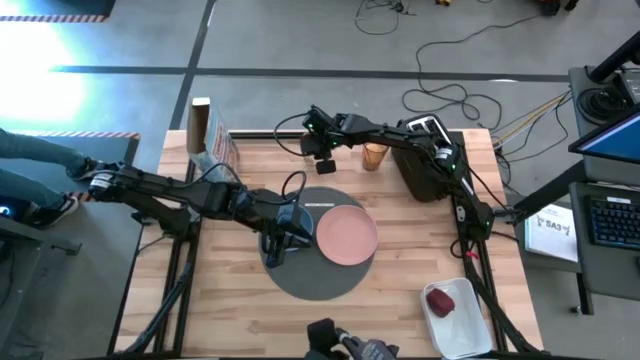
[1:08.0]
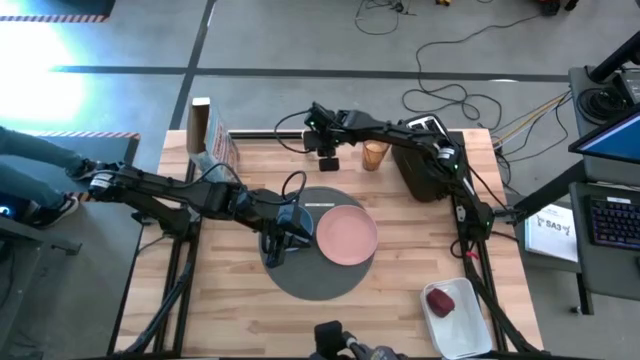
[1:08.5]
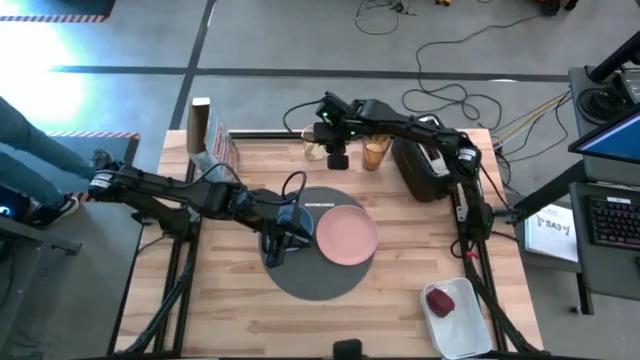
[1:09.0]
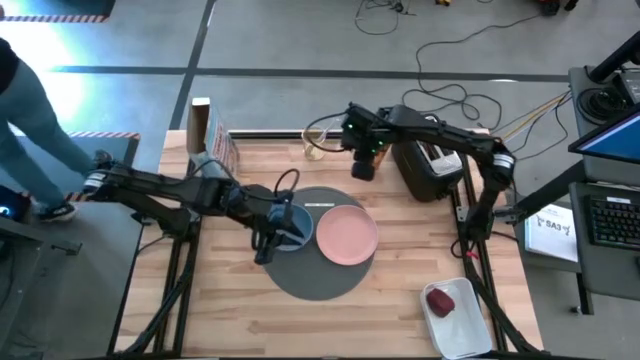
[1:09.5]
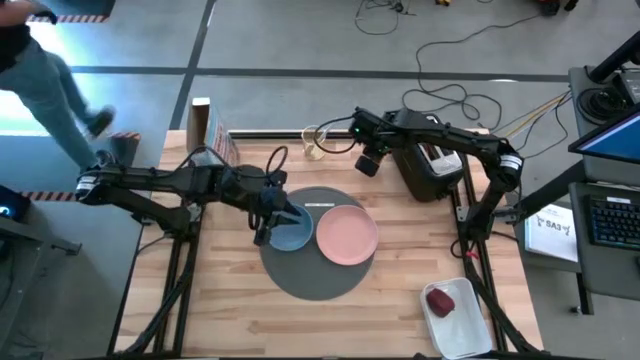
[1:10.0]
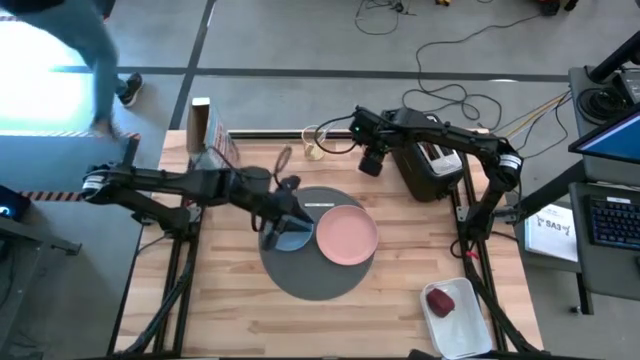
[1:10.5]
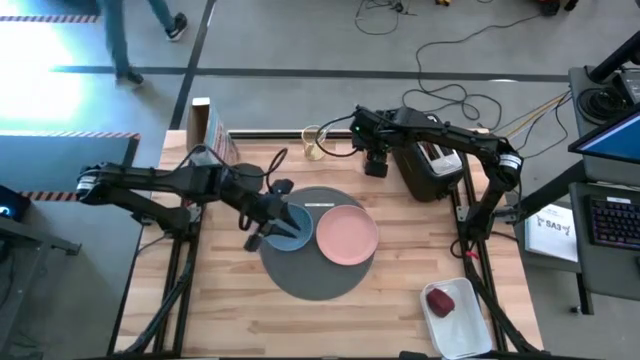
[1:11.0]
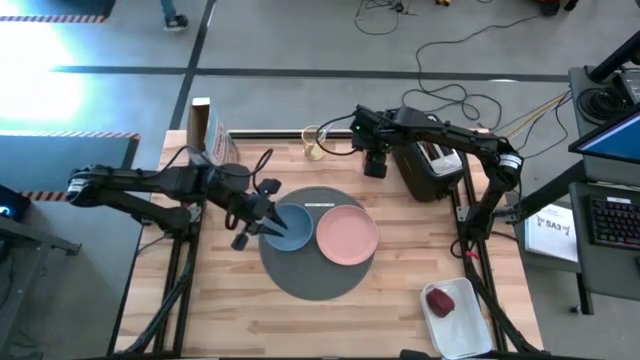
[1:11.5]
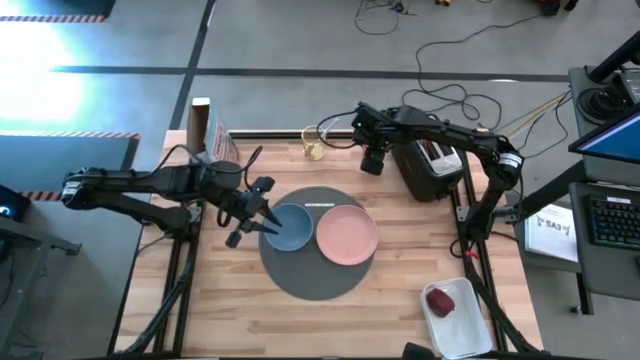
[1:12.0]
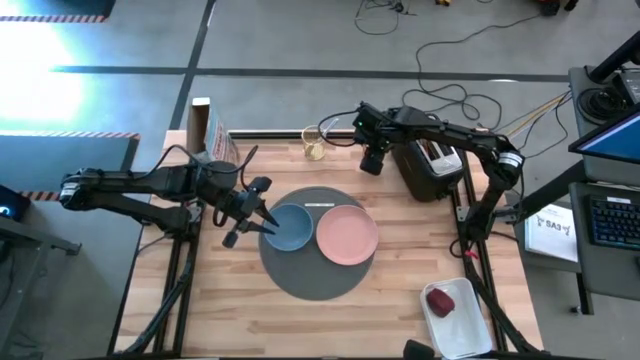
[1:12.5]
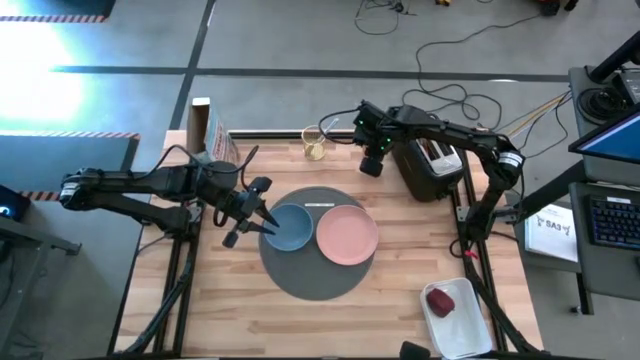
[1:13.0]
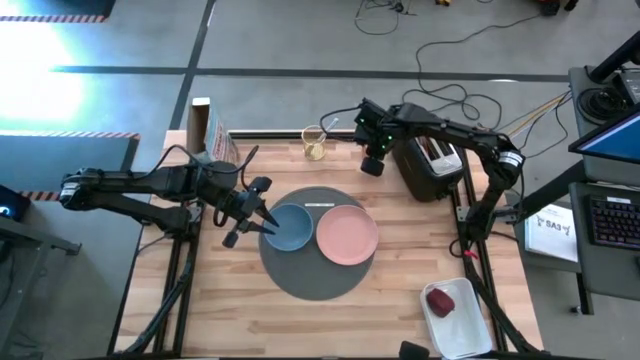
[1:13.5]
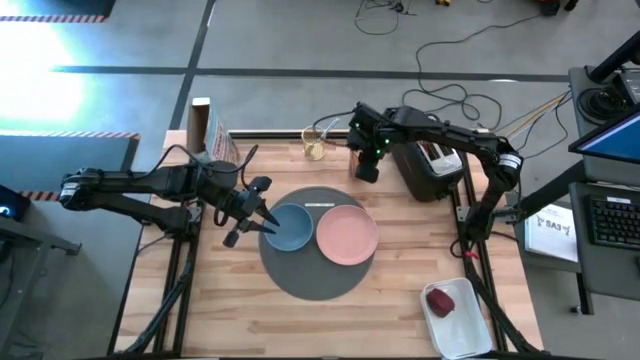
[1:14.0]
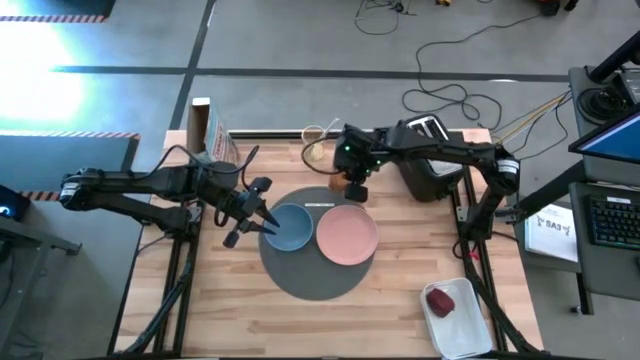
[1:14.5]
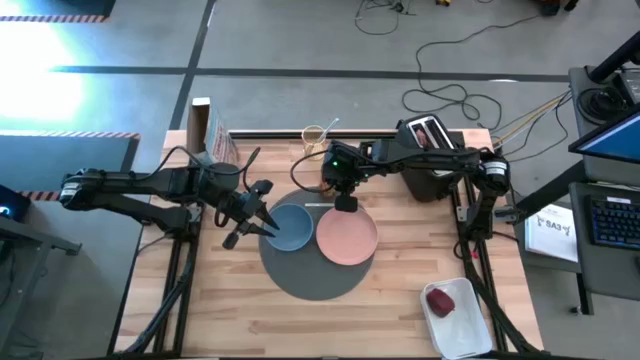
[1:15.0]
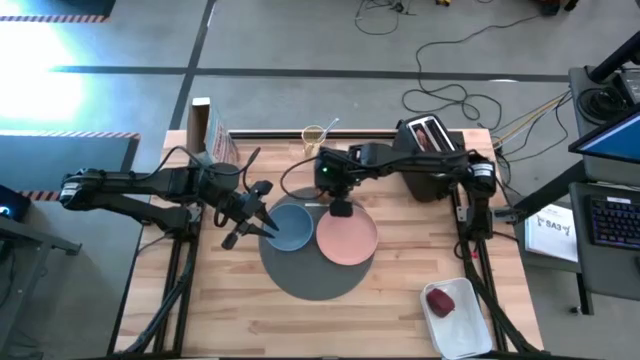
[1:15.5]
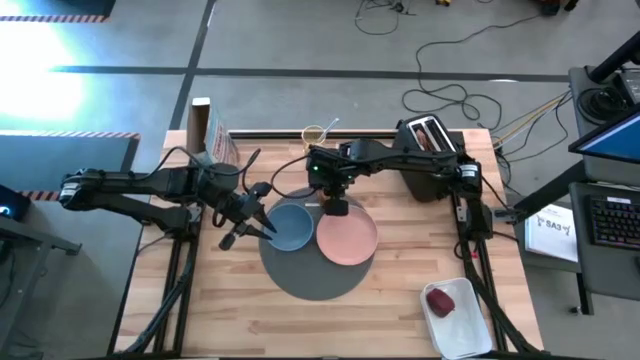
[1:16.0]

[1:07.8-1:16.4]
Task: Arrange a breakfast setting
Put the brown glass with rice on the gray table placemat

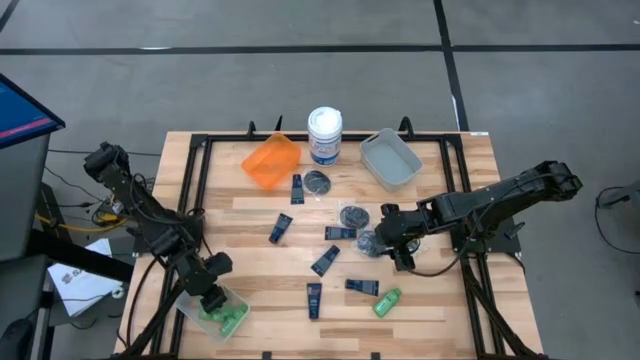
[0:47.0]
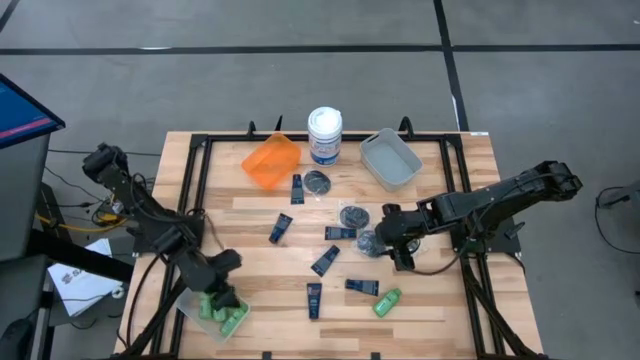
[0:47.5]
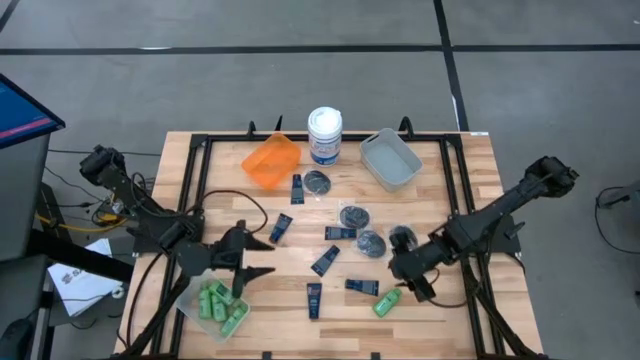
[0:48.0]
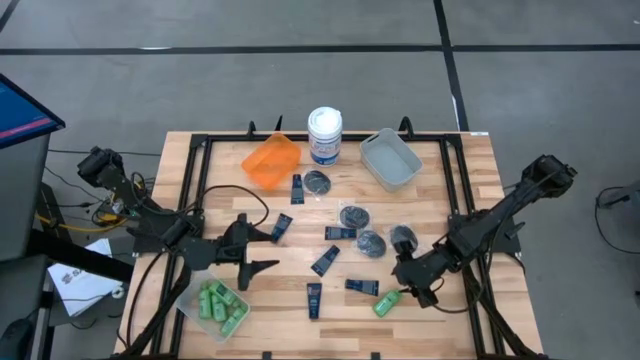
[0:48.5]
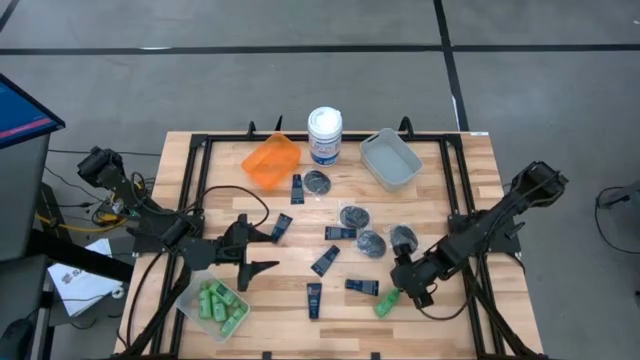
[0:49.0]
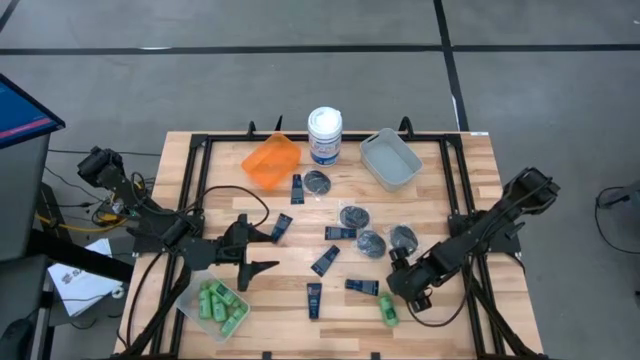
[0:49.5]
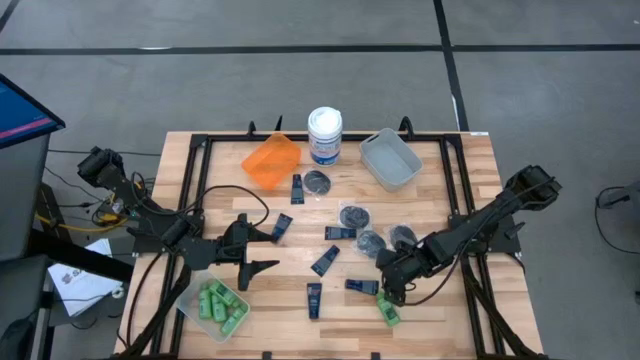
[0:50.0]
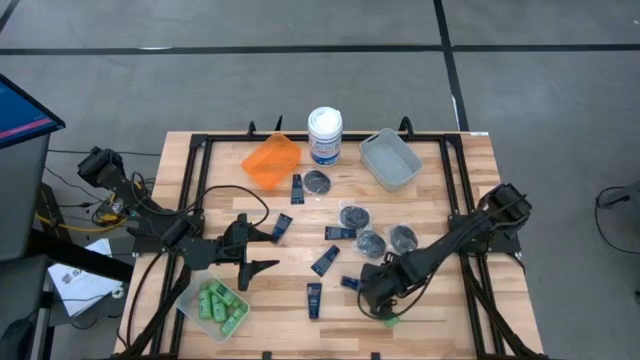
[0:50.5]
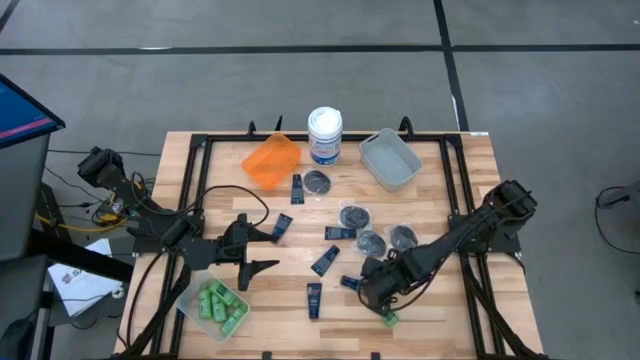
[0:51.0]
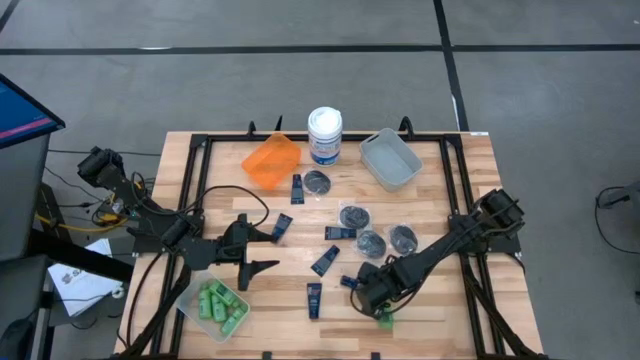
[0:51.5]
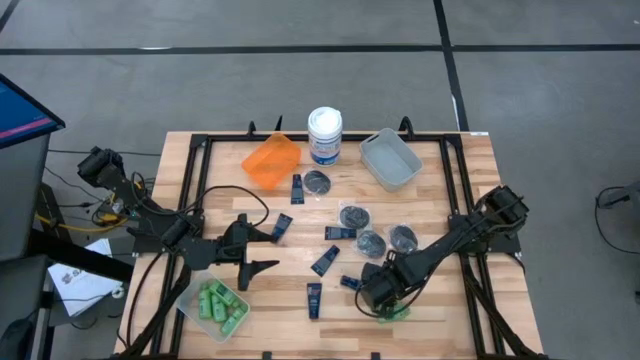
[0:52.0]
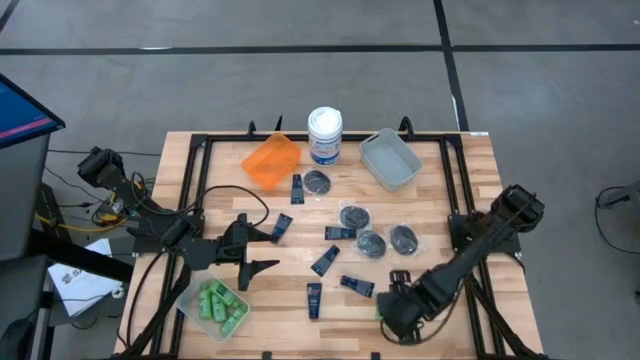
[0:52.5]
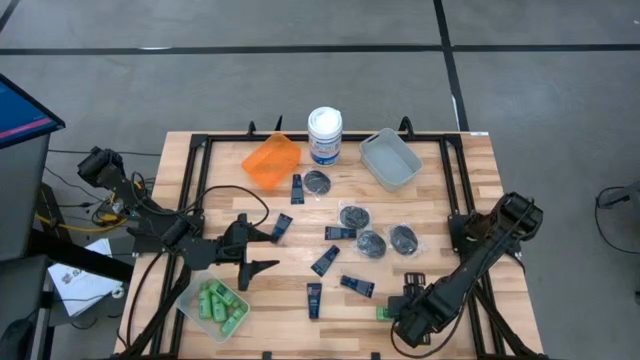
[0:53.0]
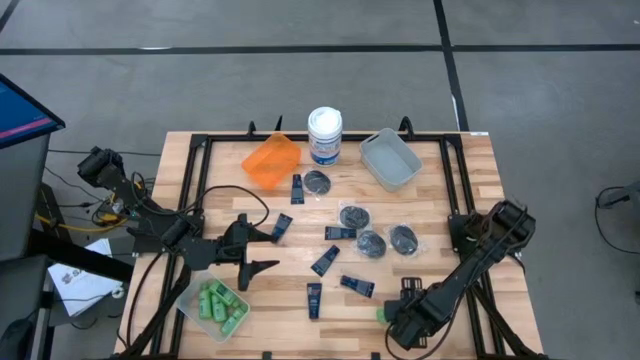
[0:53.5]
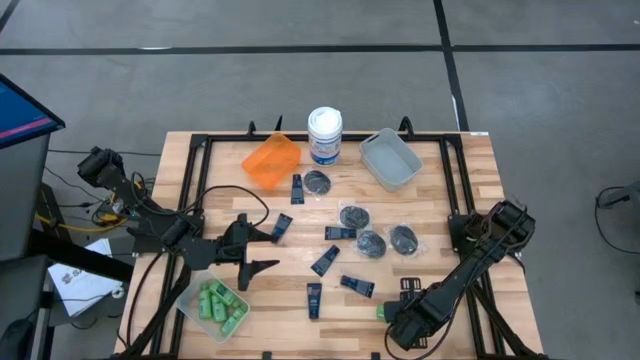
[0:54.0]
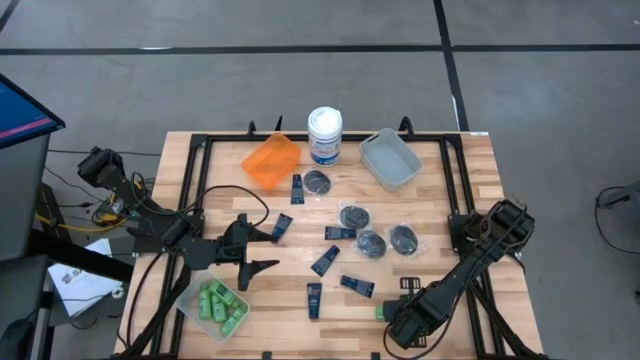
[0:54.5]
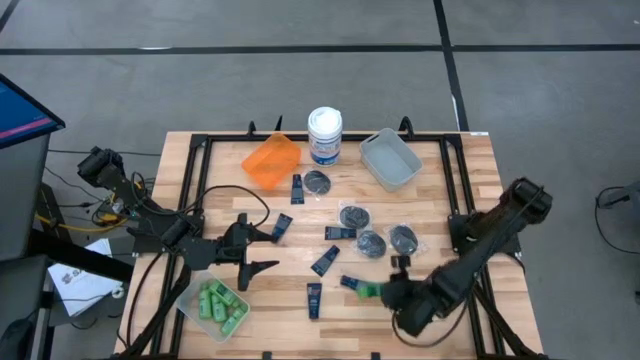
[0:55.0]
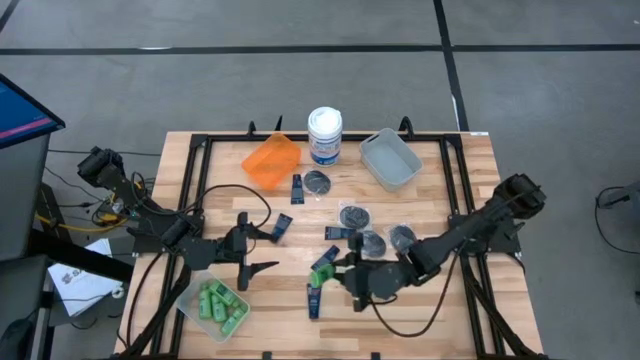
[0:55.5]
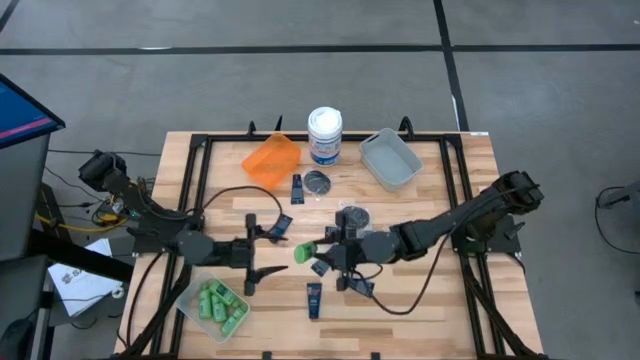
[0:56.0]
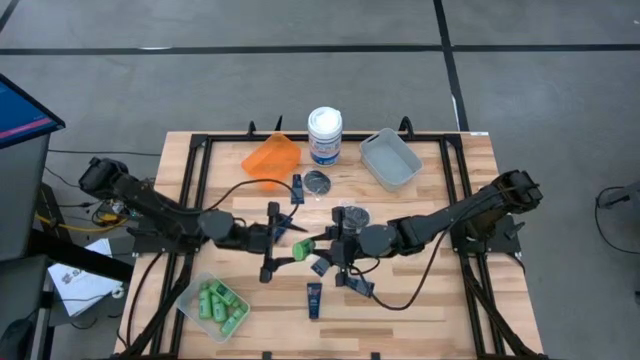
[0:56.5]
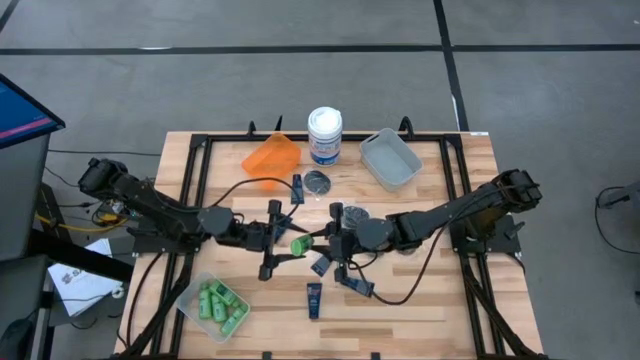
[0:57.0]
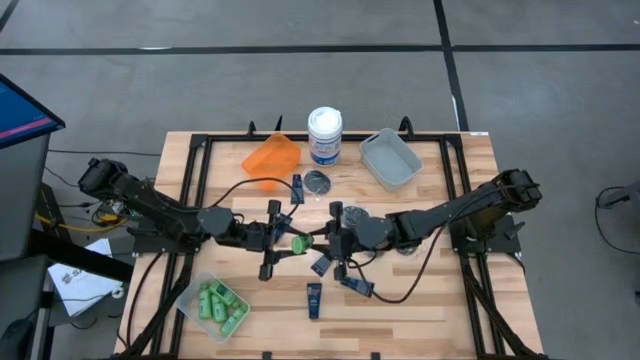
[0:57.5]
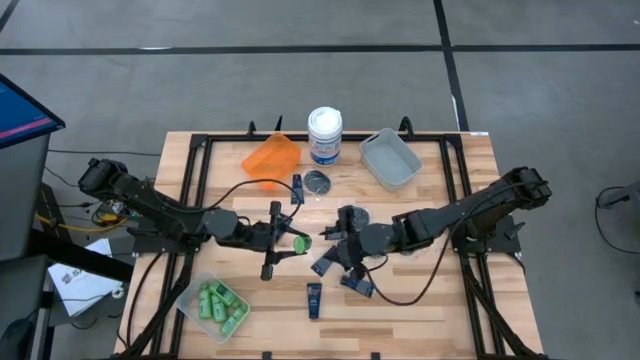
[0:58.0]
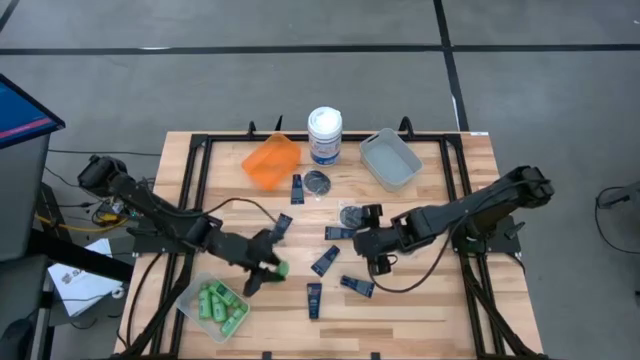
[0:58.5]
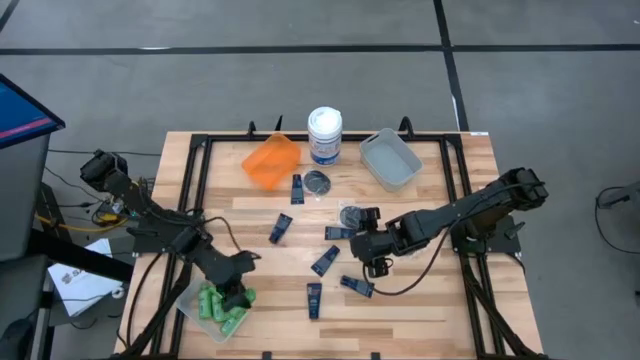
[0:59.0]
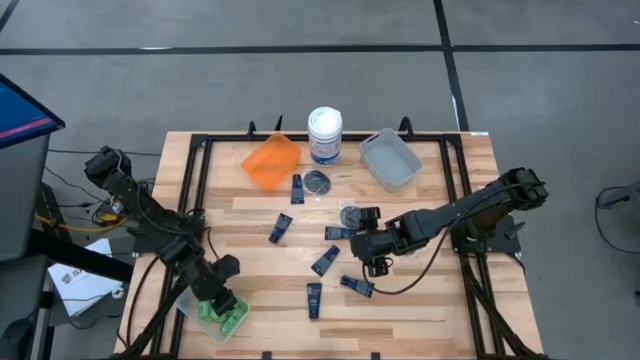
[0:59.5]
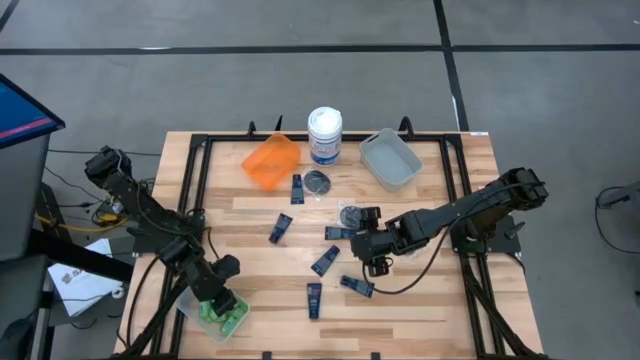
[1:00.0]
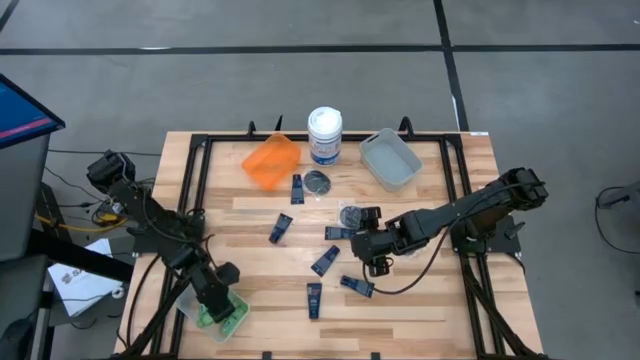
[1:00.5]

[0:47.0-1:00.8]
Task: Pick & Place Travel size toiletries
Put the shampoo into the white bin
